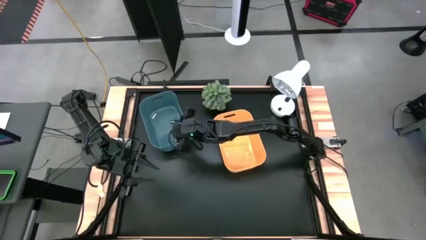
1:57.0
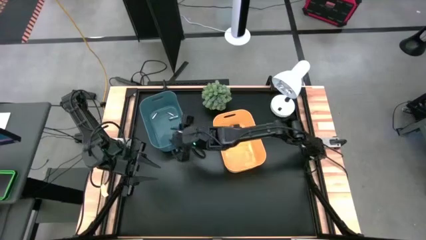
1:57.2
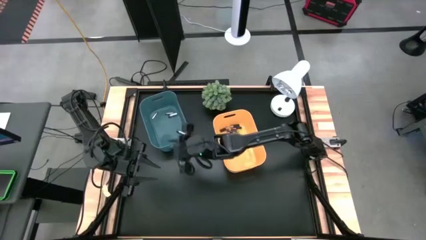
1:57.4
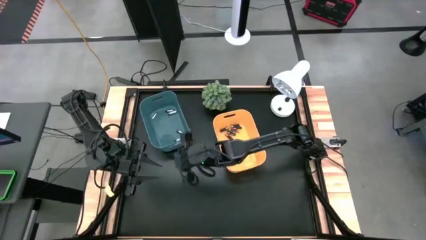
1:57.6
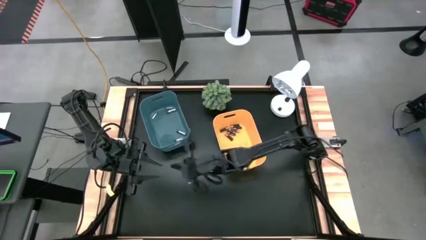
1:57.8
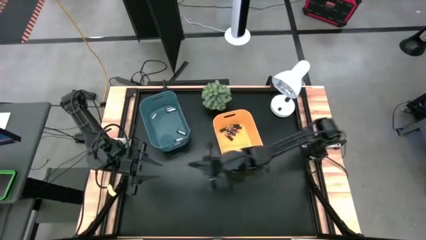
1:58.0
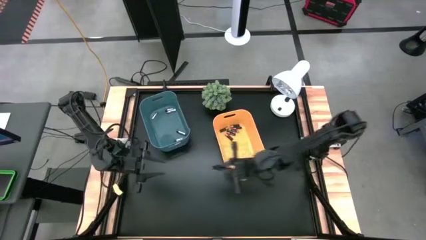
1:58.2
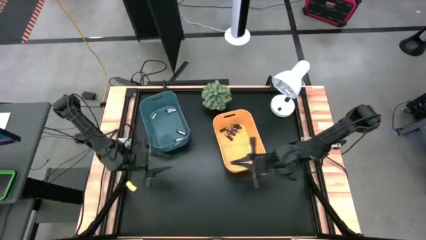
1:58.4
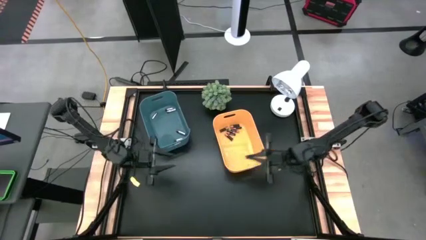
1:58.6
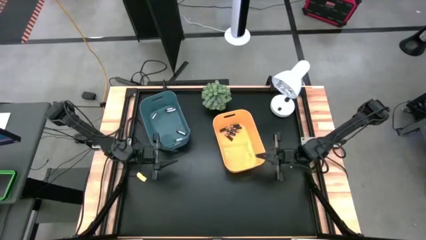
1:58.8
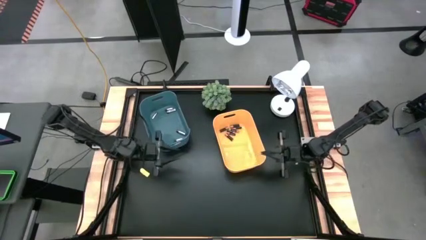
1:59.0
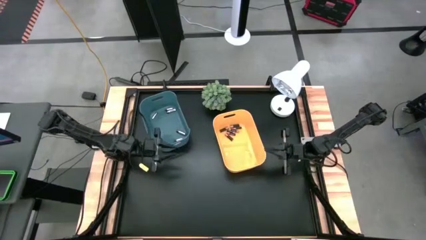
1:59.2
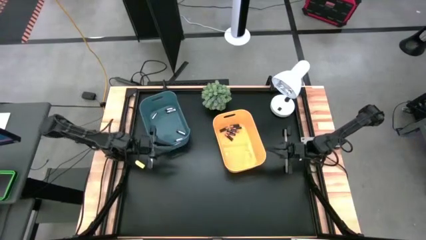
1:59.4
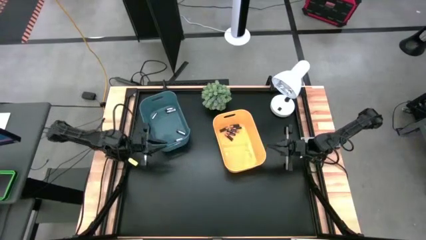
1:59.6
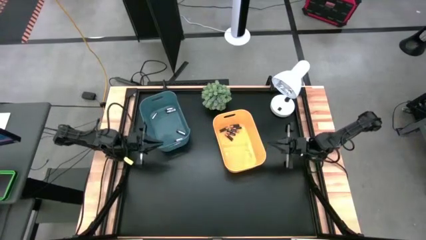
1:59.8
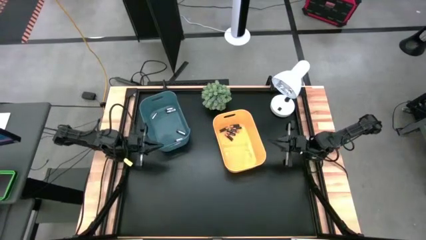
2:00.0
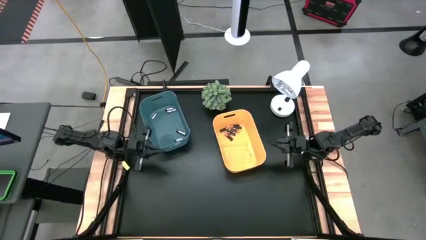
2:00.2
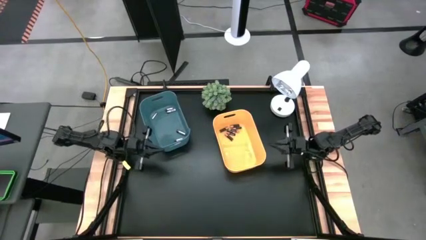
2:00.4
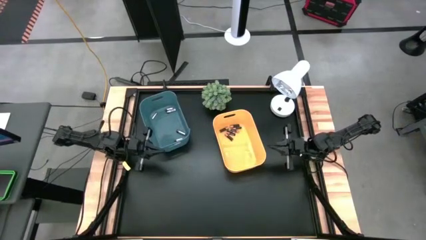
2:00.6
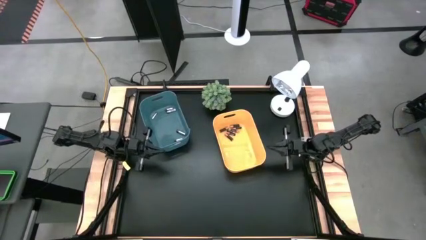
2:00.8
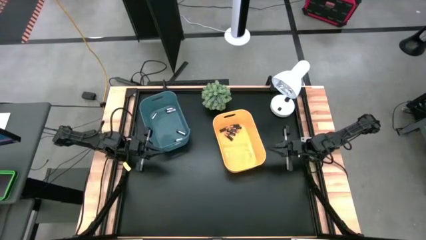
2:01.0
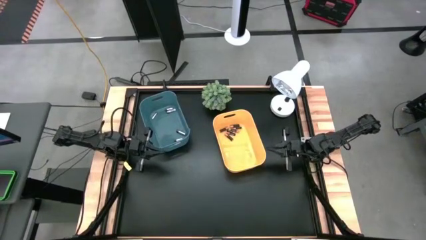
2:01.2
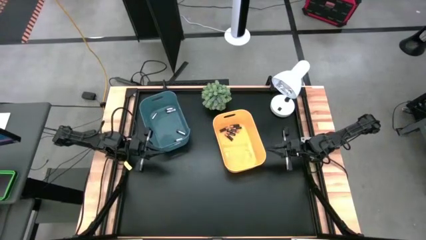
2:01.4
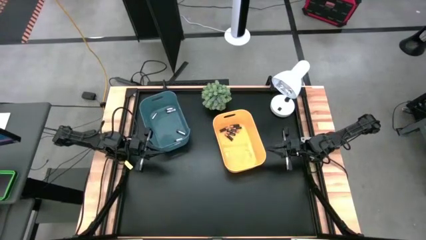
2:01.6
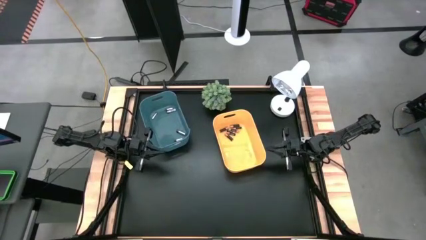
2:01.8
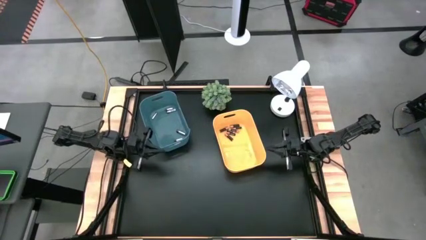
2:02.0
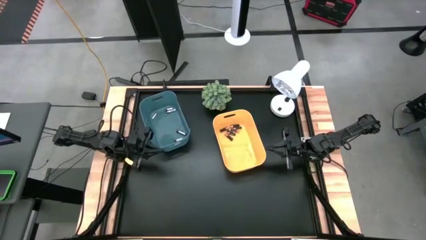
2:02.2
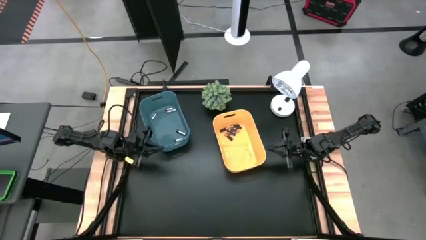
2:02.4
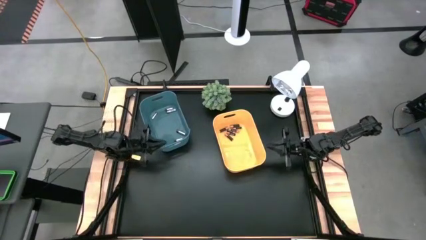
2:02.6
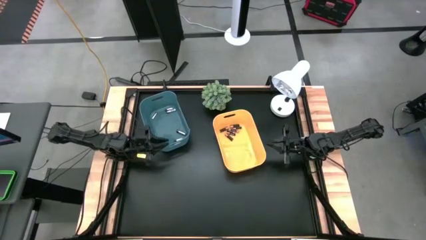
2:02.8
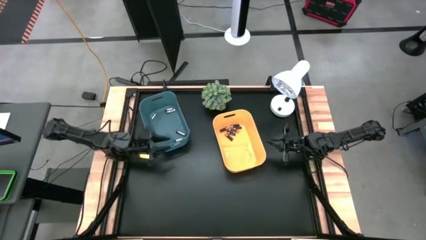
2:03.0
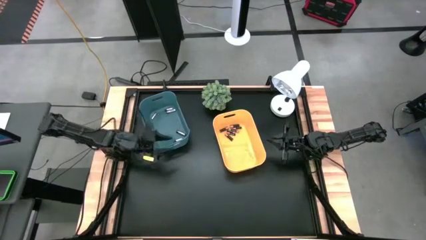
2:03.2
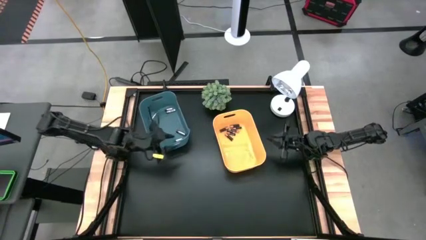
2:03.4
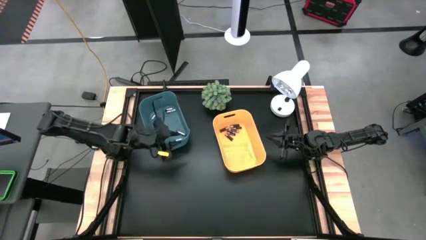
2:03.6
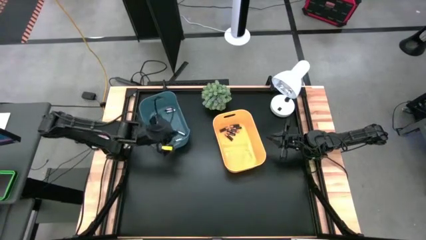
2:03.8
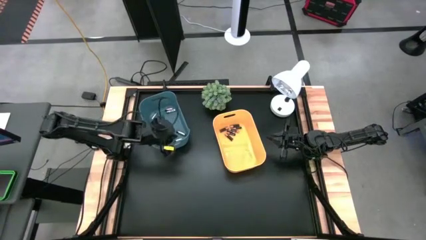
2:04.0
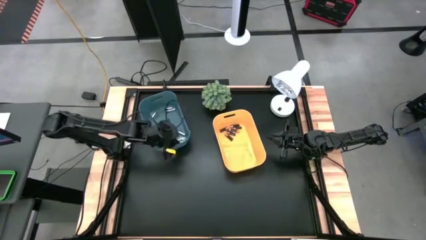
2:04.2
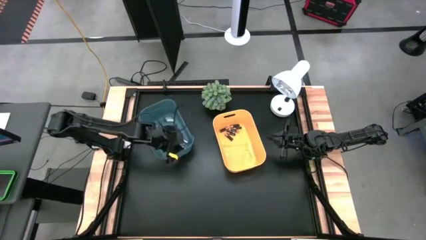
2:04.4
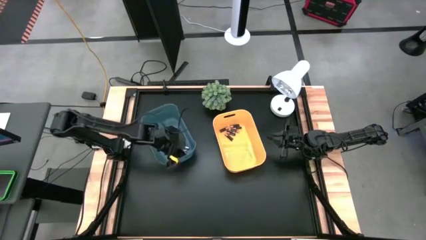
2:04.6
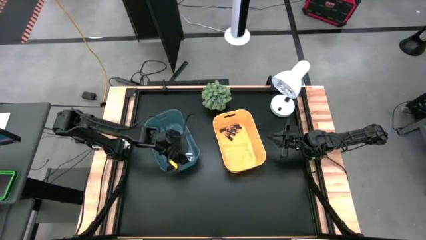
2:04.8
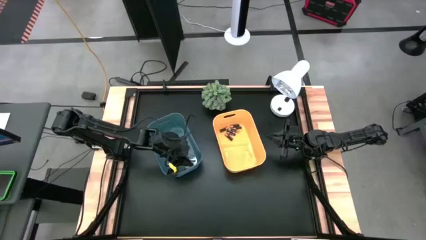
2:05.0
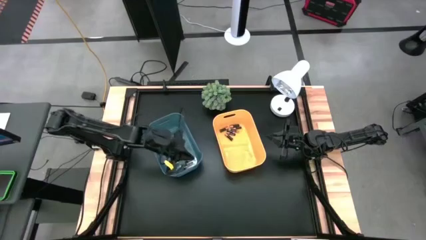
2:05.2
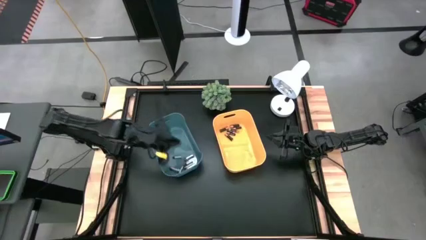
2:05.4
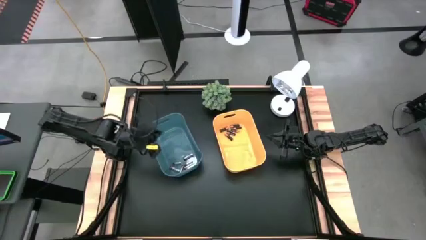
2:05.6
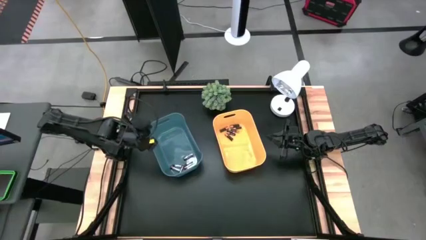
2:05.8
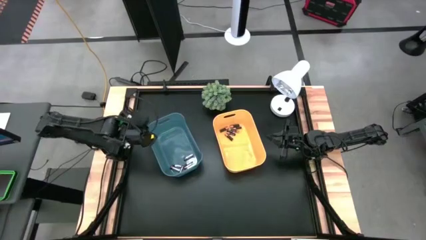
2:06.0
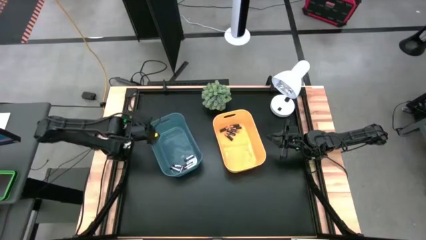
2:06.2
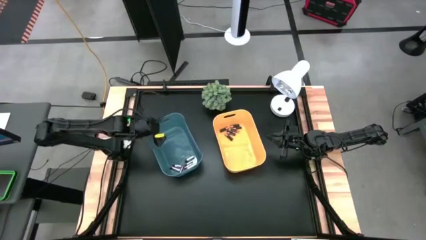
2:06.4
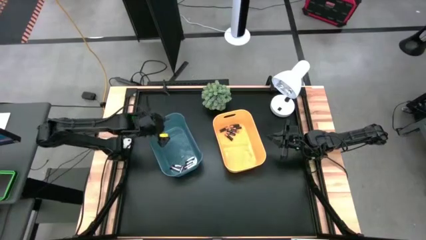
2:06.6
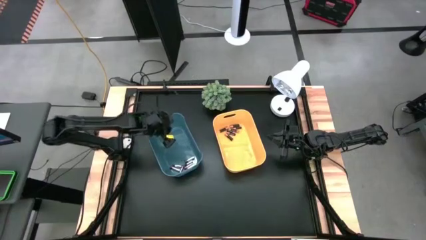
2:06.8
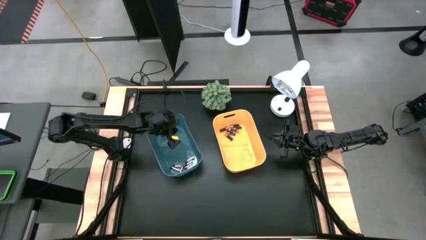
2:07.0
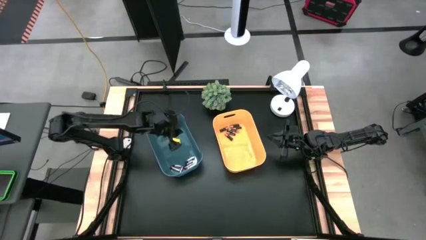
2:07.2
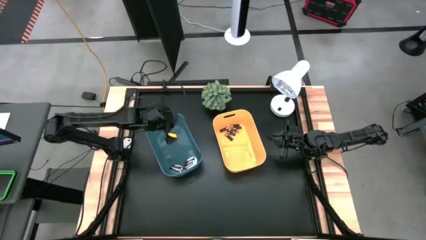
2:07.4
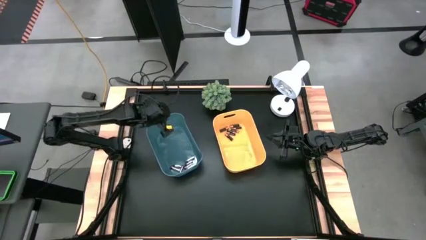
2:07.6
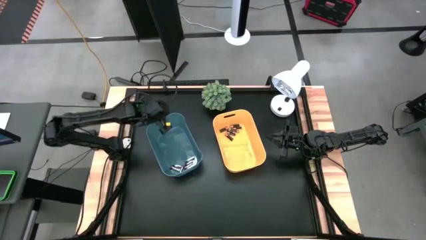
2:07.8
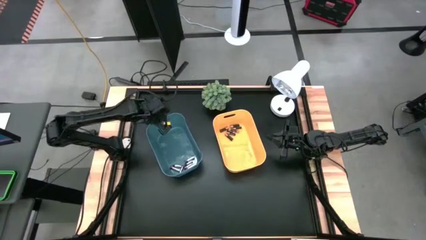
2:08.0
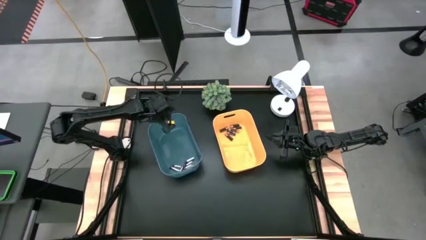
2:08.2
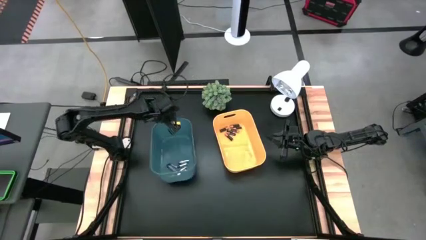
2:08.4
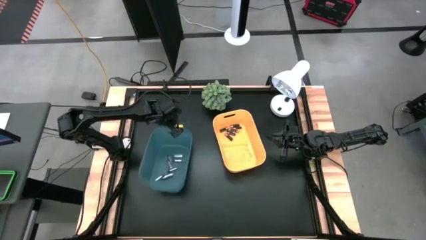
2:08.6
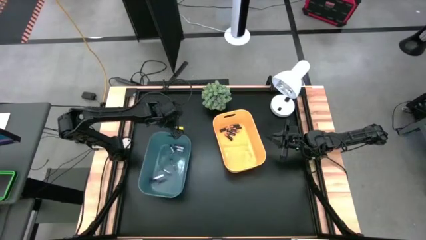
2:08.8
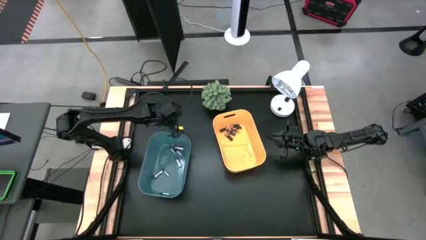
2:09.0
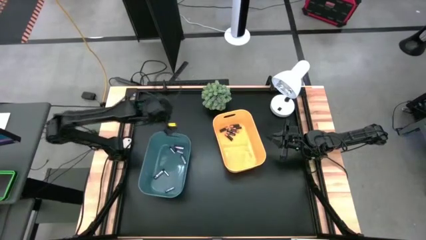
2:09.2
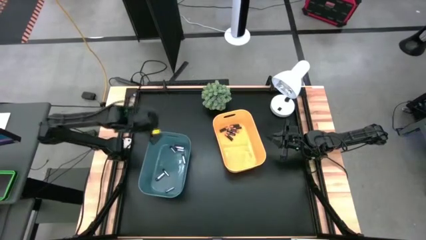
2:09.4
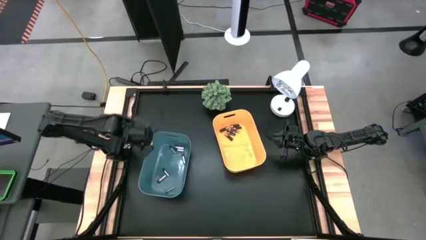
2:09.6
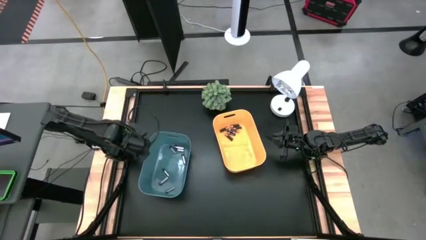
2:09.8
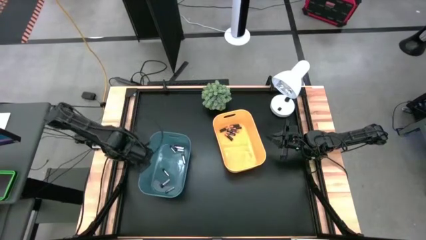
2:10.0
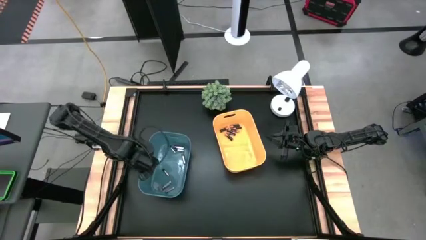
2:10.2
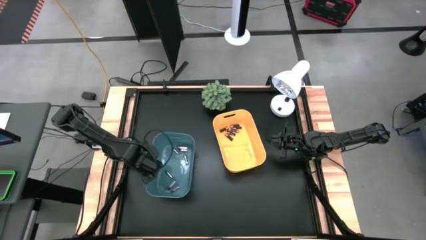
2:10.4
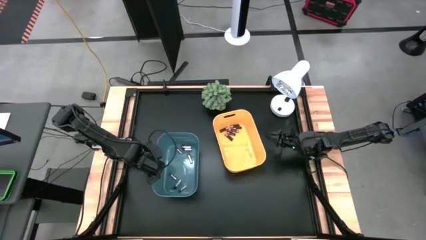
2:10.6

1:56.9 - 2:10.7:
Task: Sort batteries
Move the top left blue bin to the middle left of the table

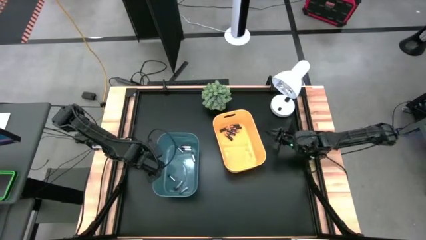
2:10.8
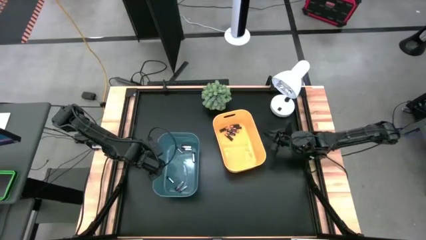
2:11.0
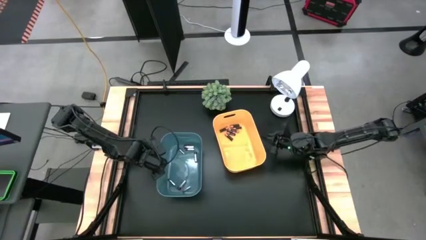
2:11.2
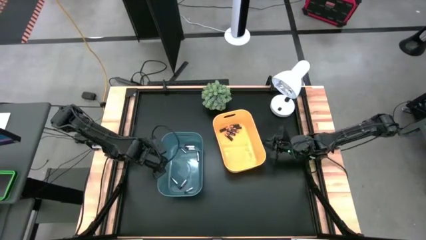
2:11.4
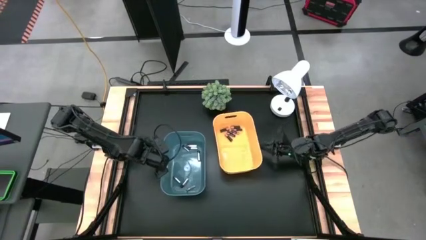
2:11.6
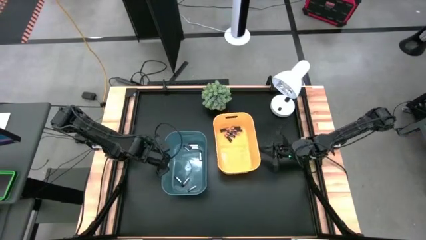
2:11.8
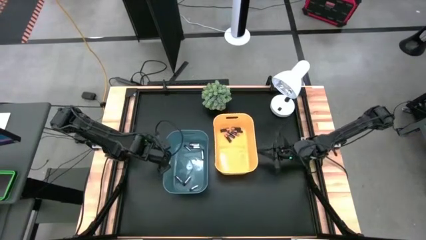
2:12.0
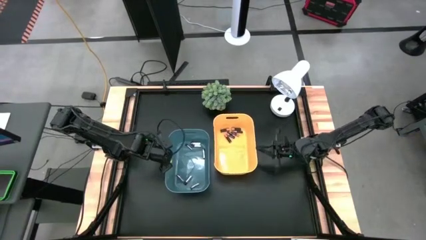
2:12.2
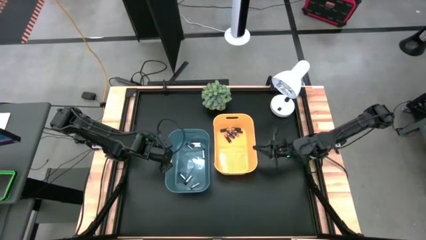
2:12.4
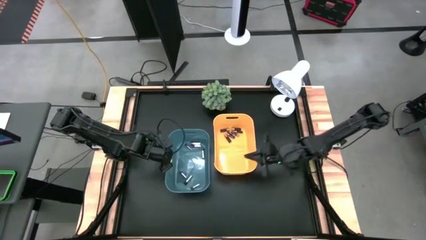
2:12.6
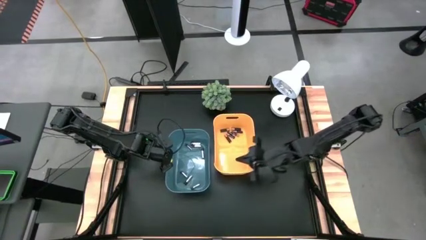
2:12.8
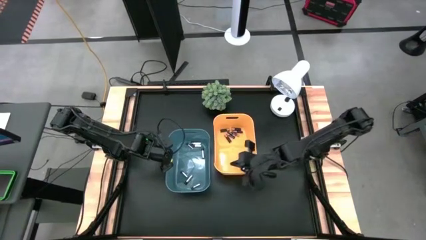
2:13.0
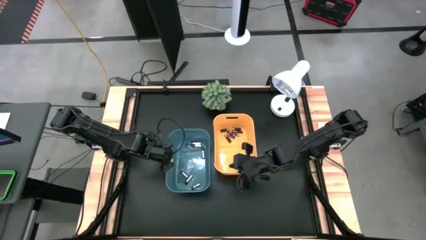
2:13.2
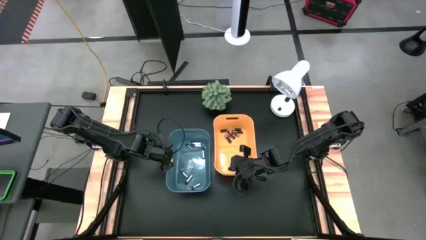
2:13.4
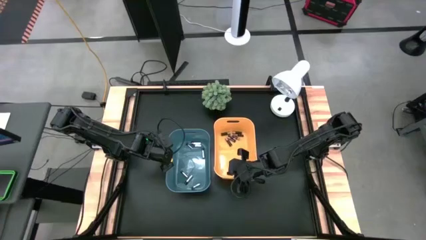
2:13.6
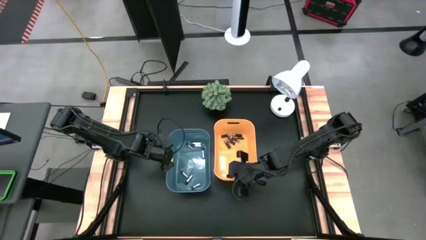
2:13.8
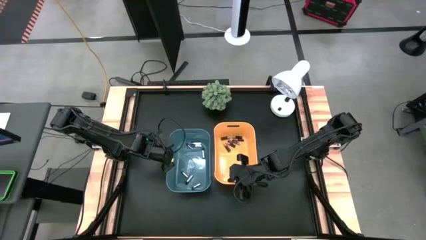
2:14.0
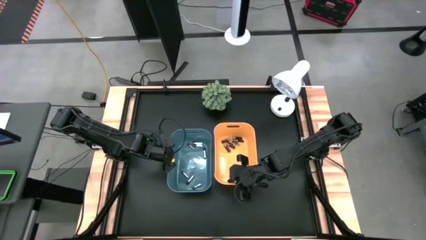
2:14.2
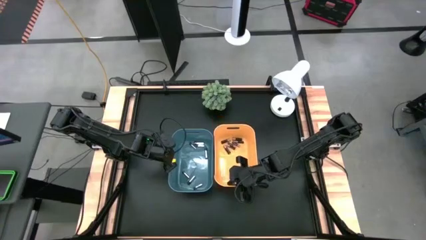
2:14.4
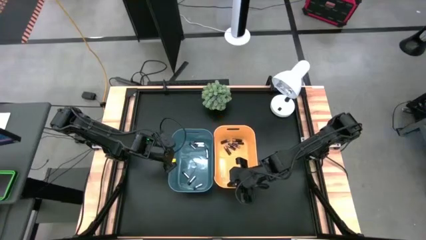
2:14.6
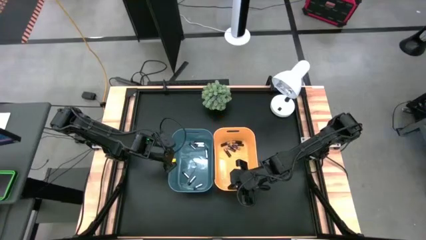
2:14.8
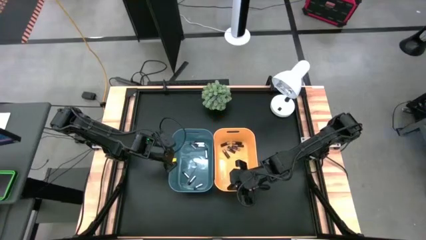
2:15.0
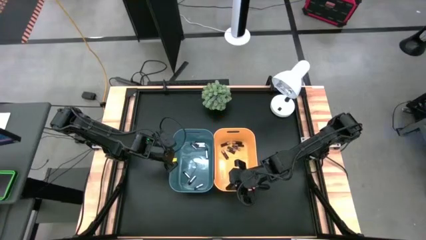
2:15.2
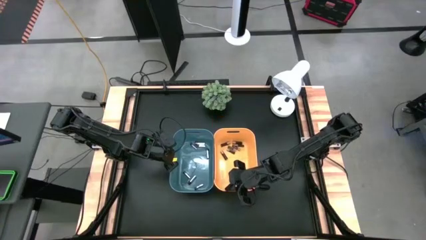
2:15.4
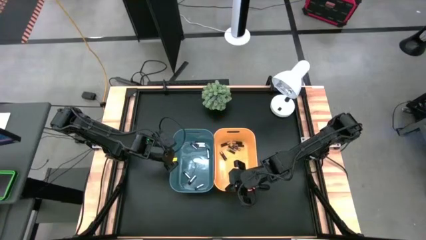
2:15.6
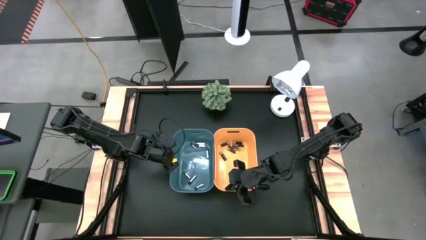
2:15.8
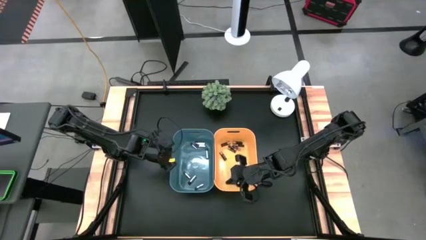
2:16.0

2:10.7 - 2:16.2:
Adjust the bins
